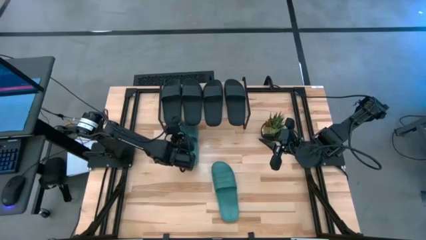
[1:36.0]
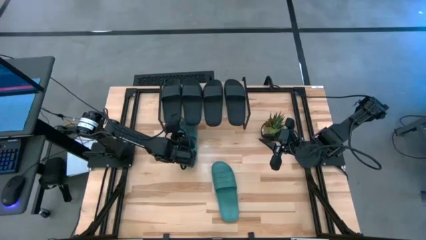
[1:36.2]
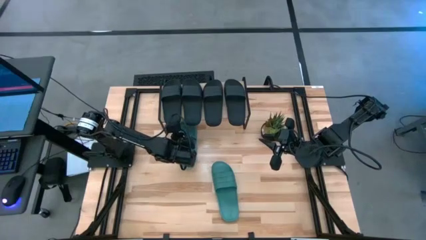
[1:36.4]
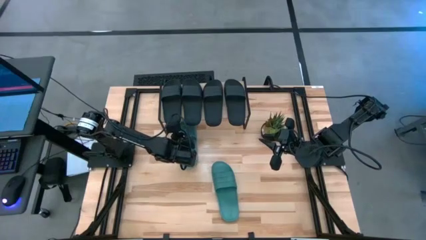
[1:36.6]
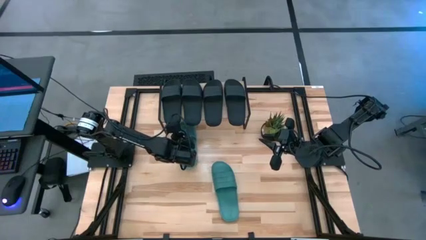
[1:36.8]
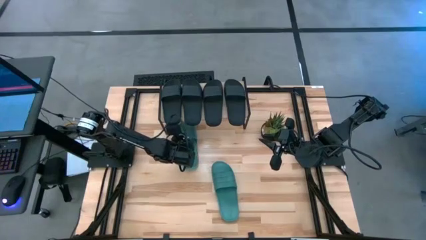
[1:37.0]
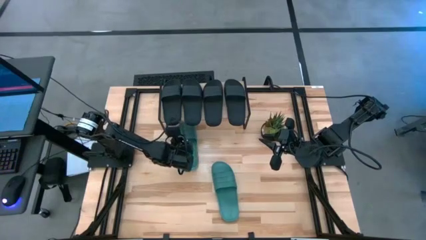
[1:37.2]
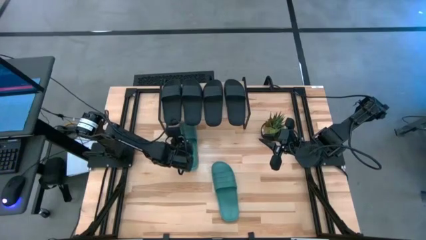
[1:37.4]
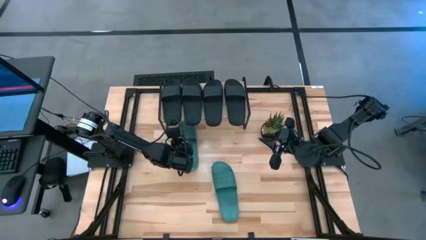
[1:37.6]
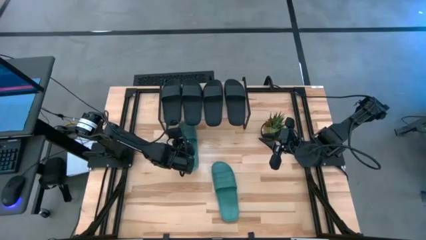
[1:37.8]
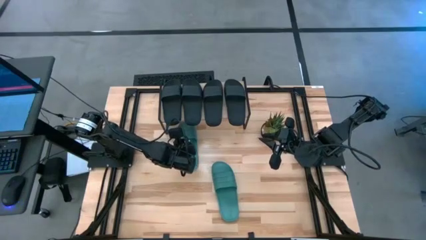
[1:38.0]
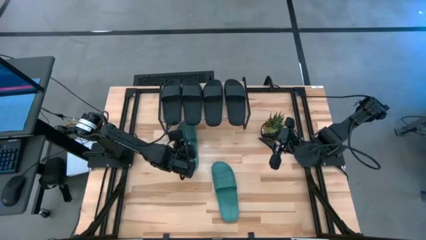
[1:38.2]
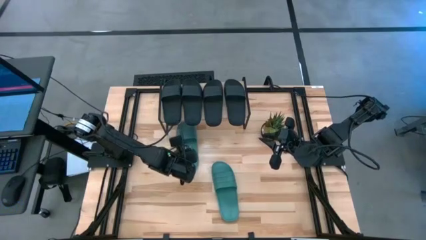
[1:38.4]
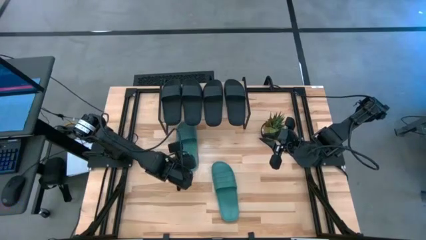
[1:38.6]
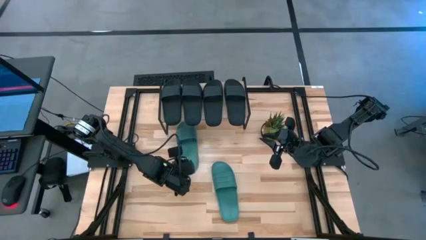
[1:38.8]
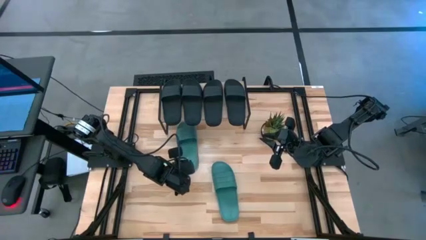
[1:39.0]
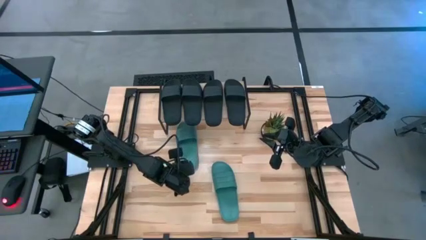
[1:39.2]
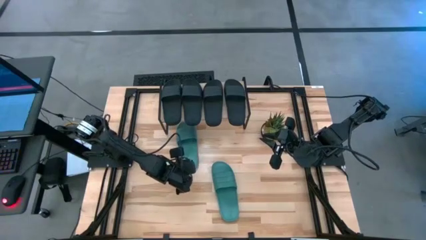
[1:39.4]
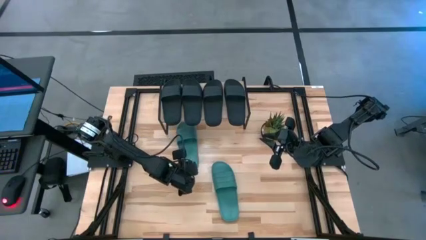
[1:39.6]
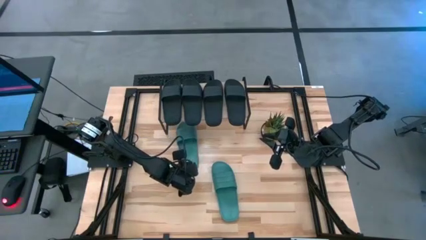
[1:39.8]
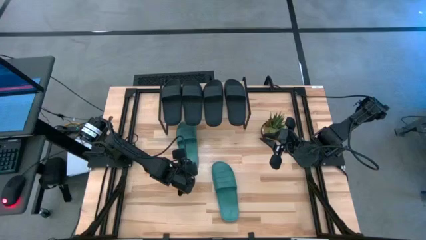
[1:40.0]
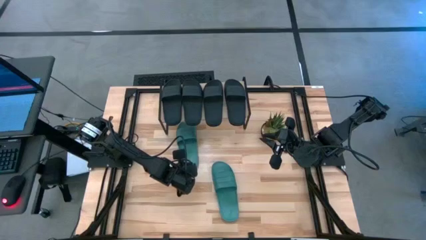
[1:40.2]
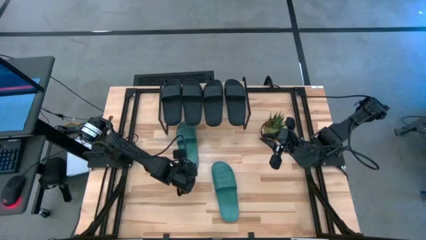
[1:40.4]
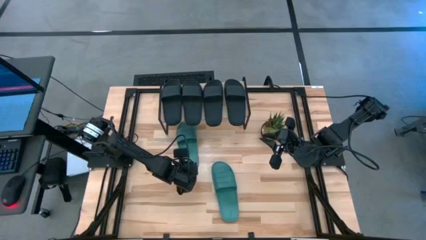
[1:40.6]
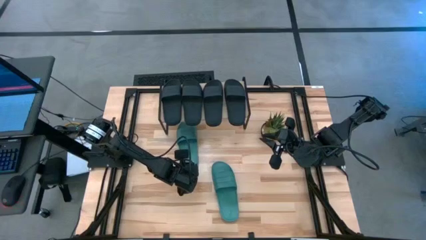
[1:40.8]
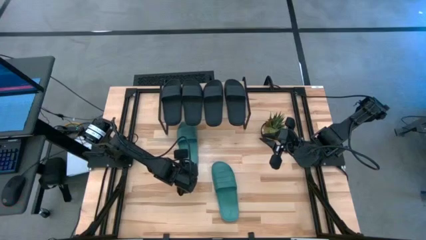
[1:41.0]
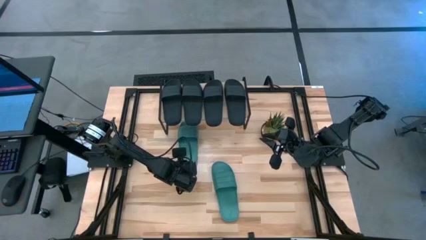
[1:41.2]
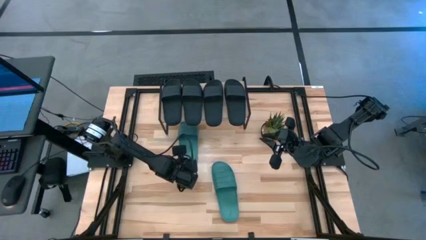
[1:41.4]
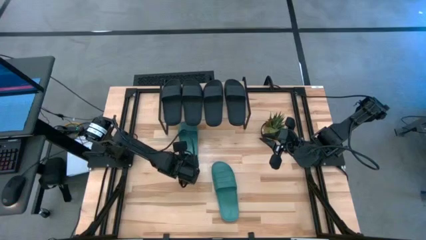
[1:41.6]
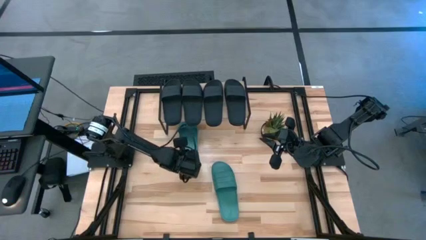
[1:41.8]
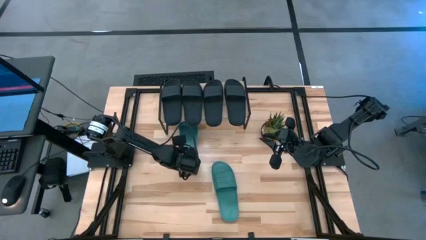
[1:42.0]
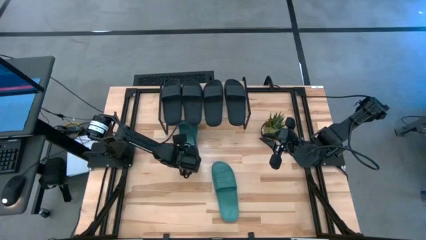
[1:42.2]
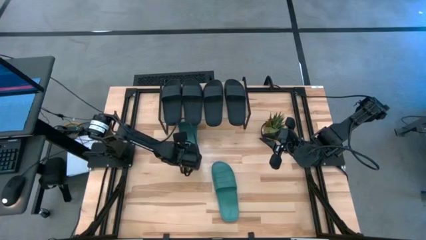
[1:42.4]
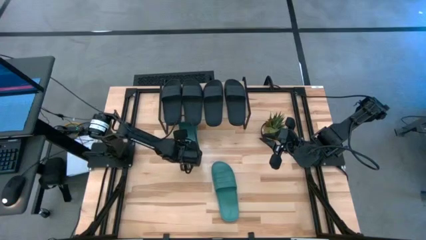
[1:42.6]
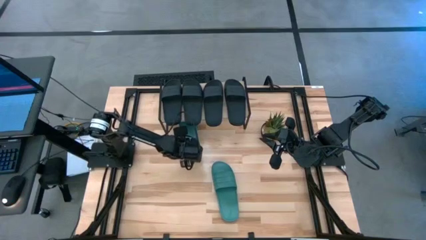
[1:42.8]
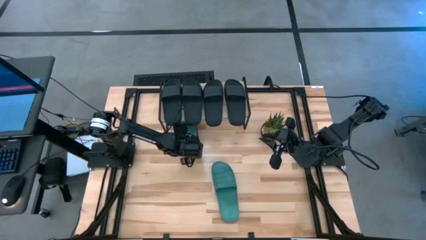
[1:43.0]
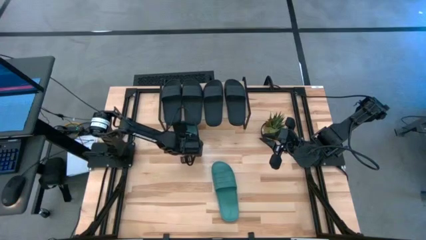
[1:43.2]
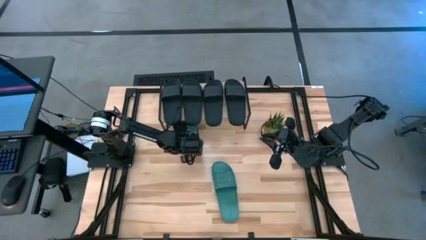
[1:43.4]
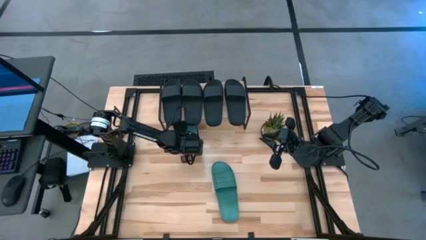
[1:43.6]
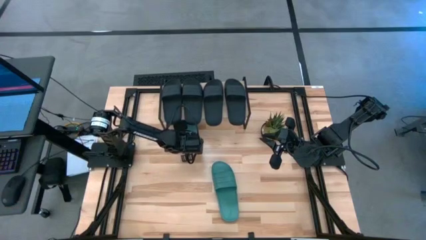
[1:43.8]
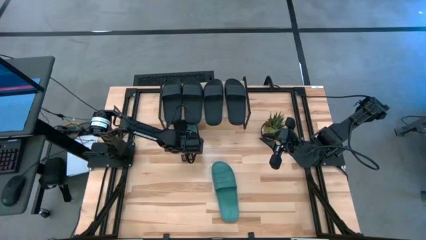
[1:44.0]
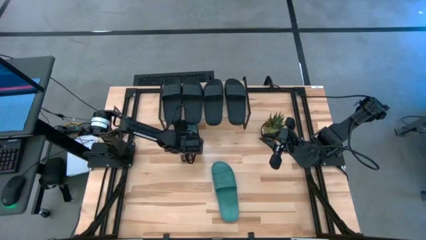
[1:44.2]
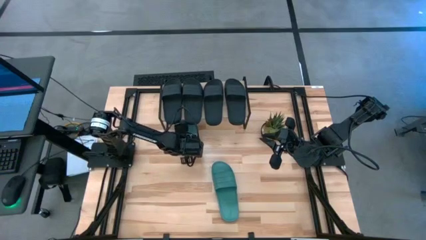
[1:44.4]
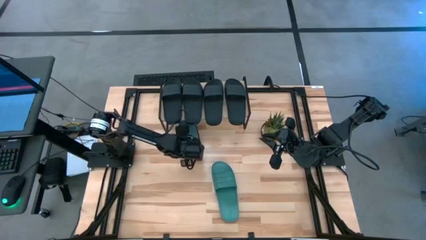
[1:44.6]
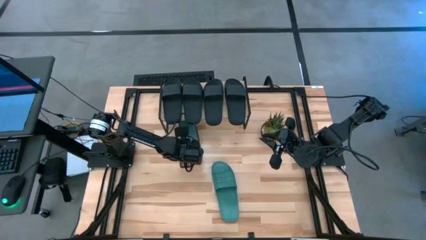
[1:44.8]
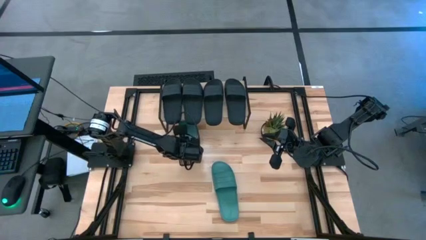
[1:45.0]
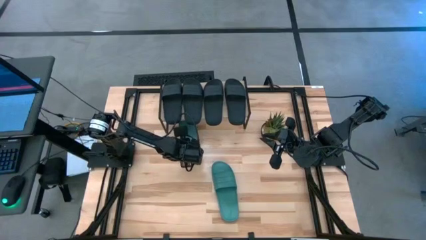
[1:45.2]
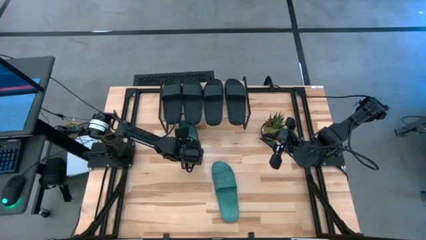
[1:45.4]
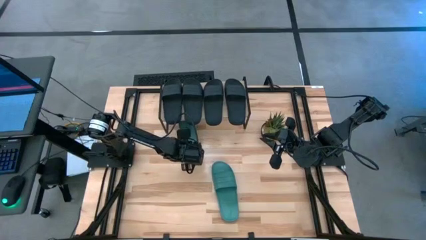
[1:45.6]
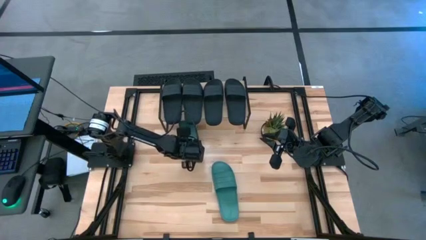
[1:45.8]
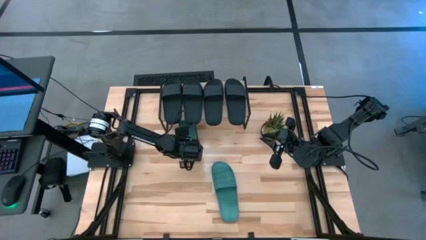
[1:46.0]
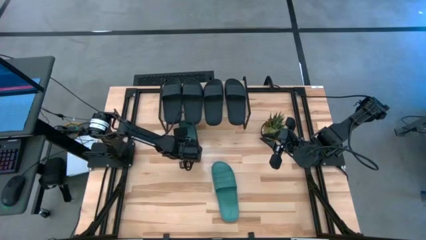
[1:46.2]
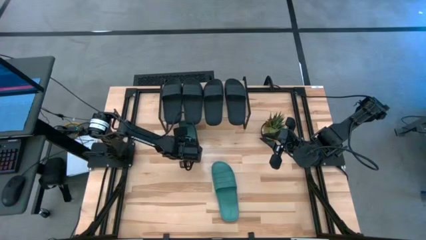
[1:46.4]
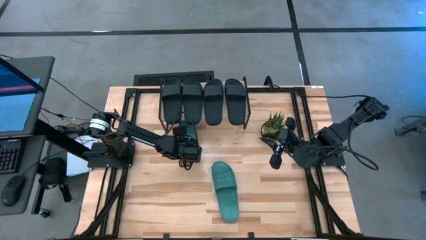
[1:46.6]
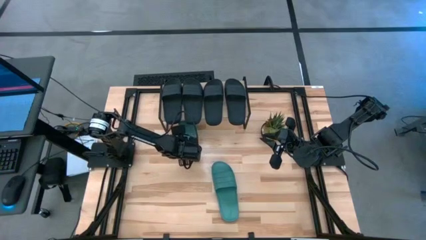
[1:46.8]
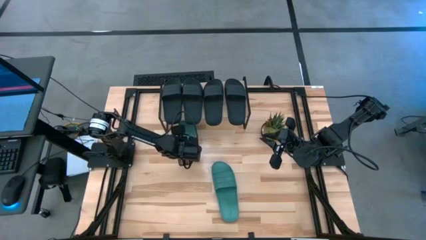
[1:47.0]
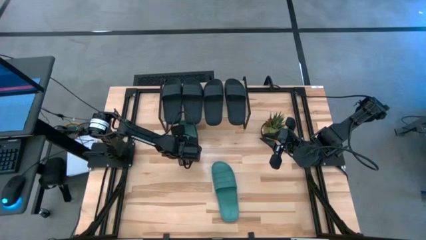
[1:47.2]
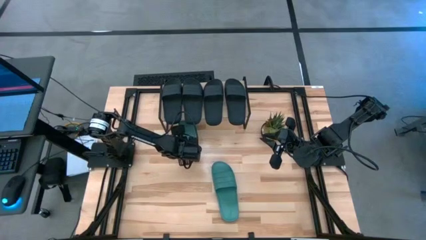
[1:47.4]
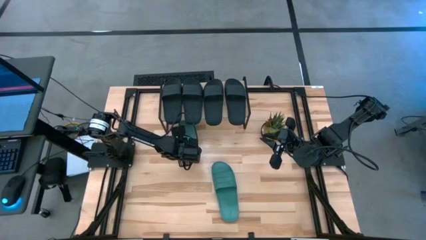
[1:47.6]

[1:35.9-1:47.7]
Task: Pick and place slides into the shelf
Put the green slide under the shelf

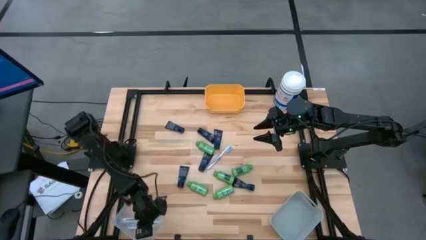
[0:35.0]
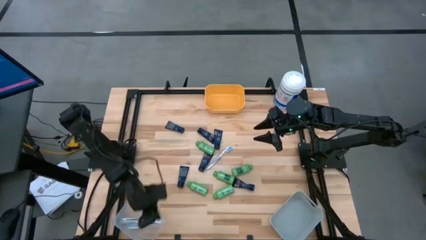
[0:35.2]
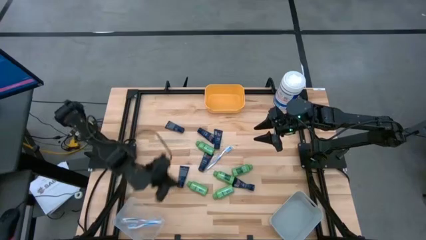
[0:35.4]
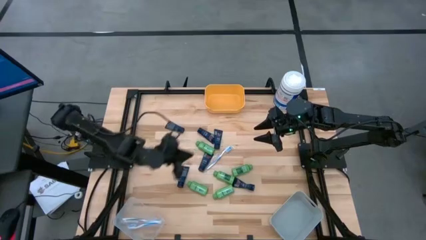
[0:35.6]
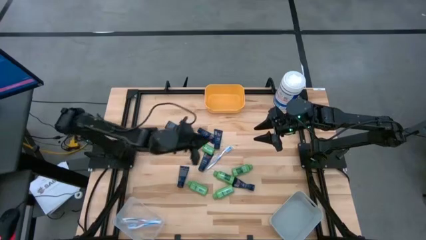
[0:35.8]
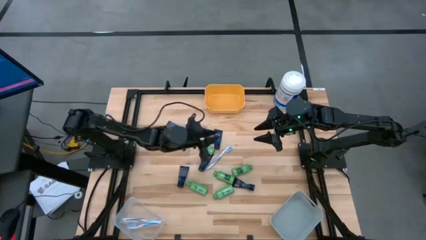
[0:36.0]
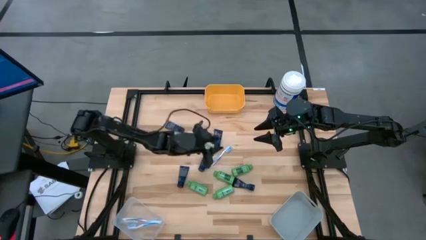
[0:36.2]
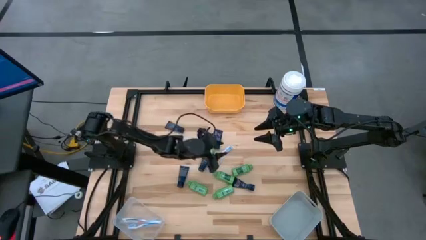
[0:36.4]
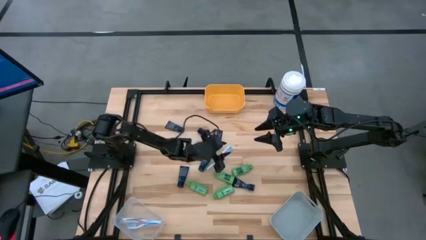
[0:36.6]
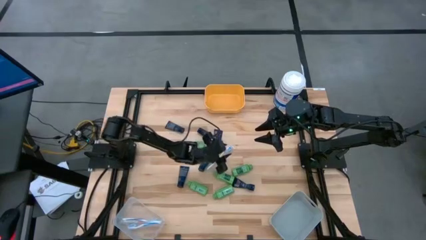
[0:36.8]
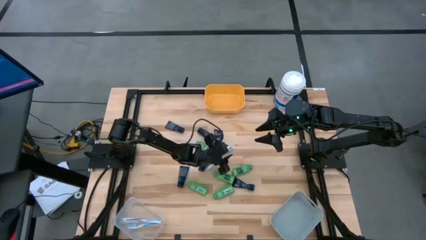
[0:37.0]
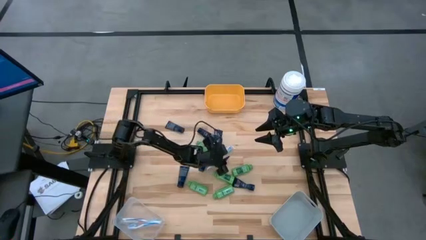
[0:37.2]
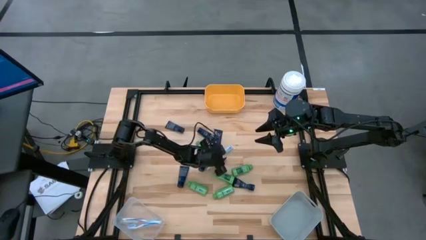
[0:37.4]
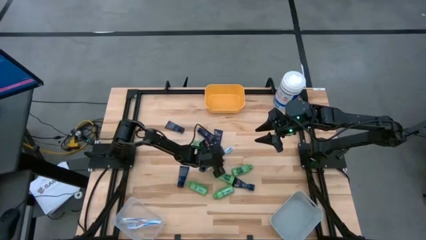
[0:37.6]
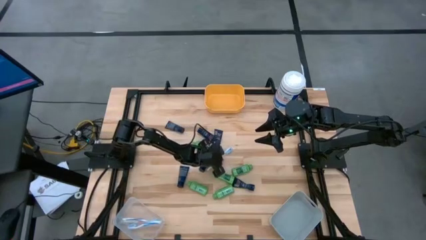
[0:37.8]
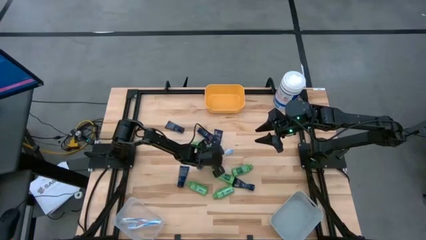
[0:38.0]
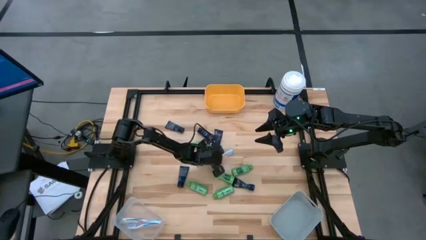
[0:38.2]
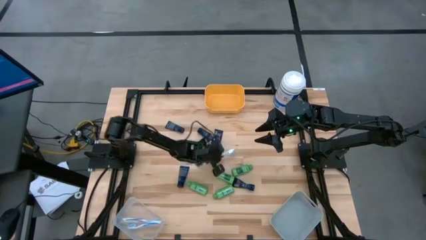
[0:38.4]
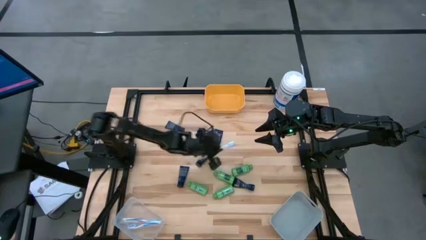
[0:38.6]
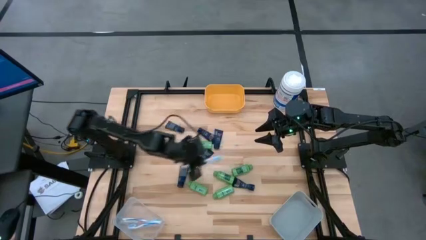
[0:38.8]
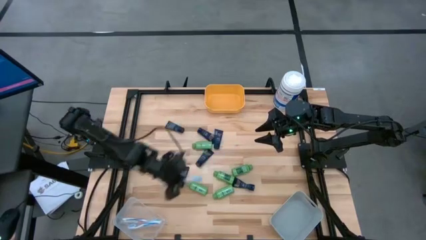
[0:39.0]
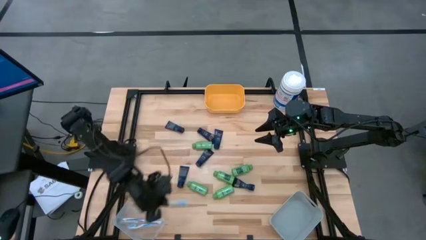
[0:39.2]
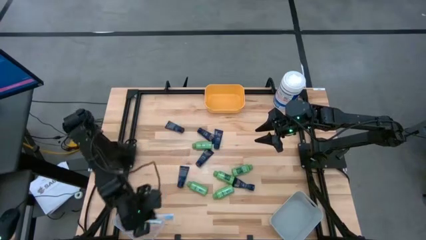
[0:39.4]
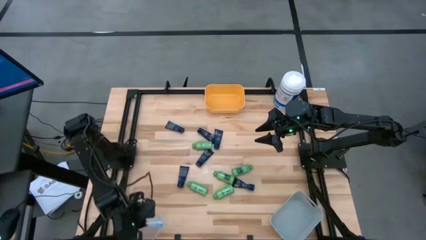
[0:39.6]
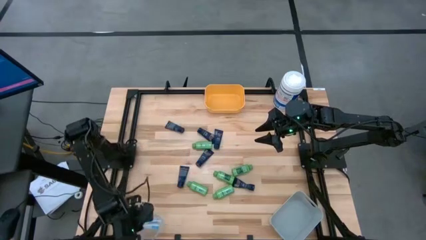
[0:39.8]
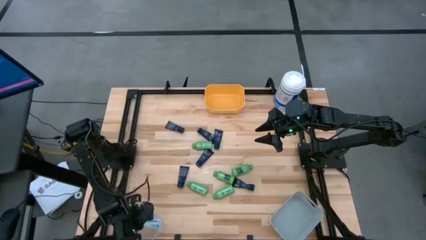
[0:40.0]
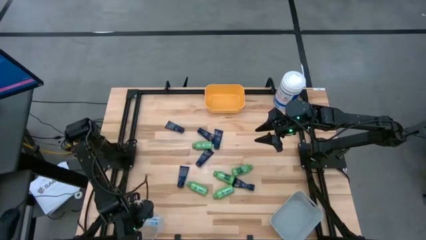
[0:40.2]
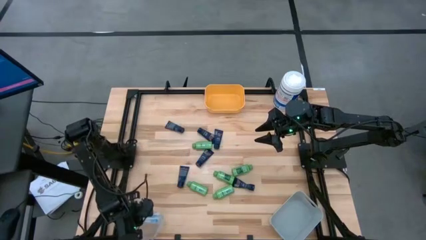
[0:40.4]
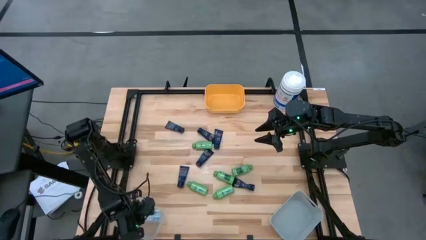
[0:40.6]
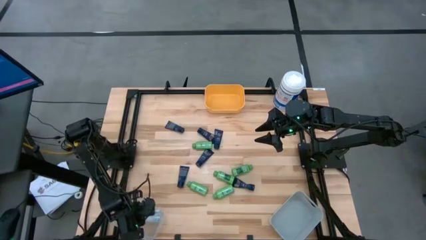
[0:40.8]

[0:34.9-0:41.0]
Task: Pick & Place Travel size toiletries
Put the light blue toothbrush into the transparent bin
